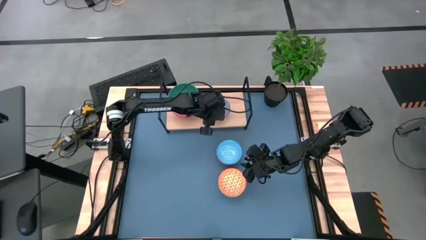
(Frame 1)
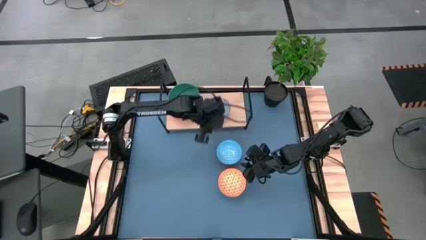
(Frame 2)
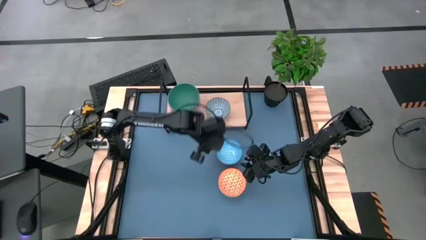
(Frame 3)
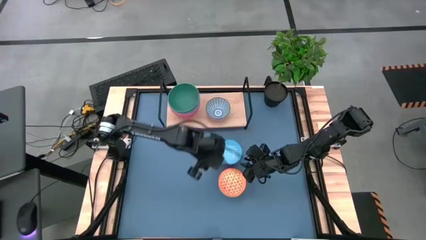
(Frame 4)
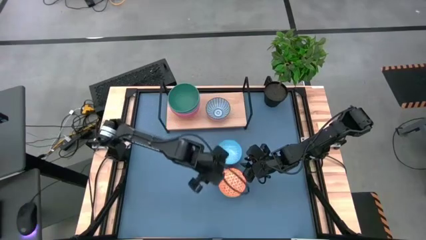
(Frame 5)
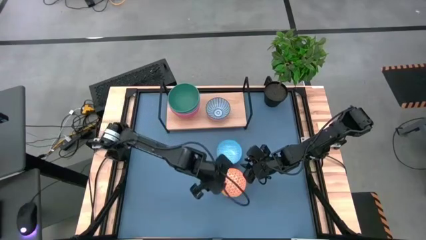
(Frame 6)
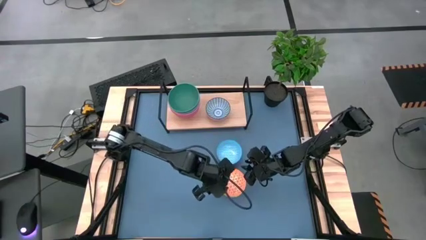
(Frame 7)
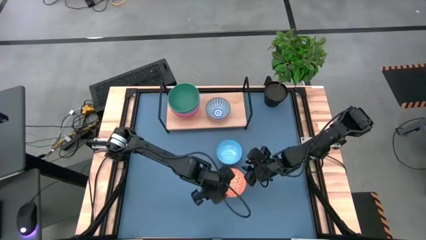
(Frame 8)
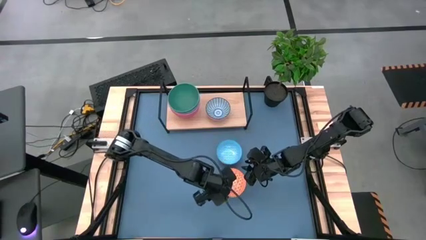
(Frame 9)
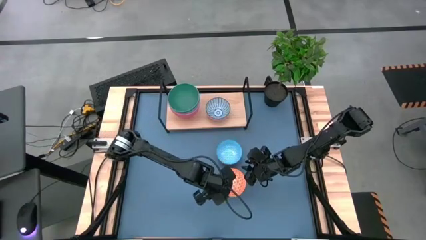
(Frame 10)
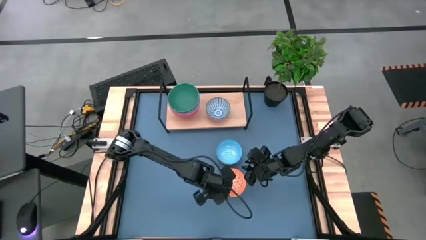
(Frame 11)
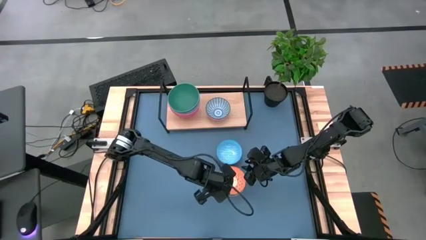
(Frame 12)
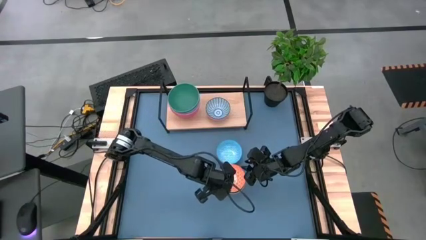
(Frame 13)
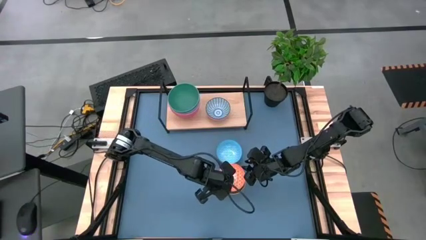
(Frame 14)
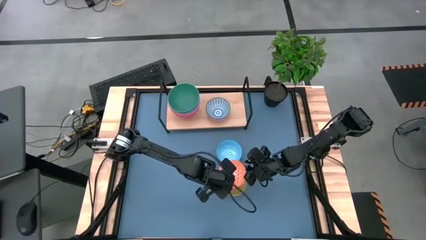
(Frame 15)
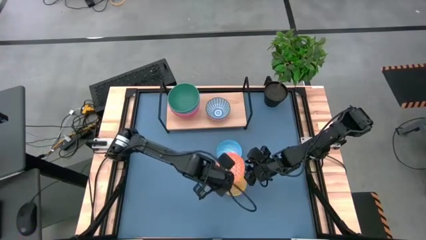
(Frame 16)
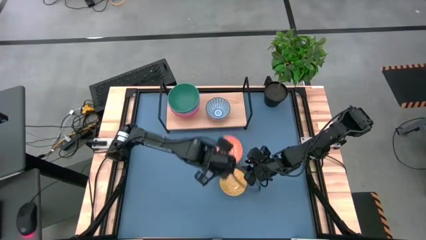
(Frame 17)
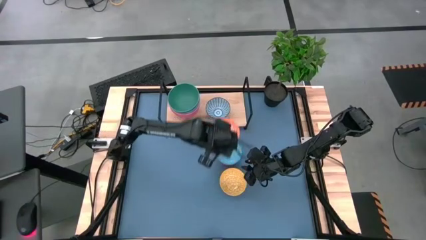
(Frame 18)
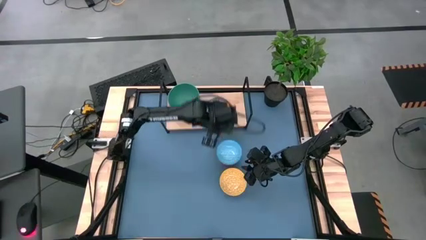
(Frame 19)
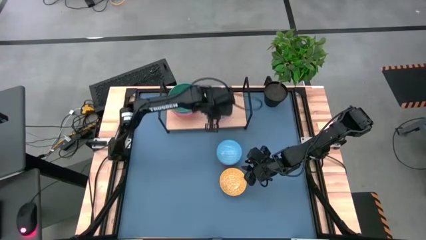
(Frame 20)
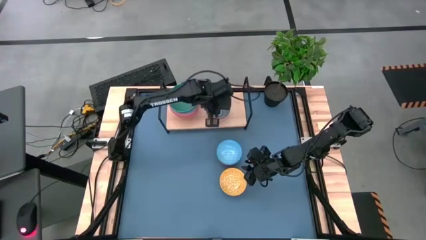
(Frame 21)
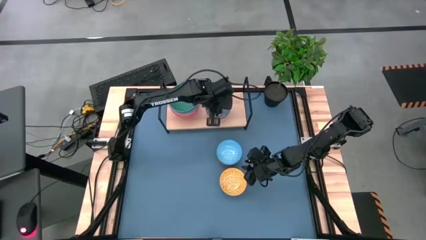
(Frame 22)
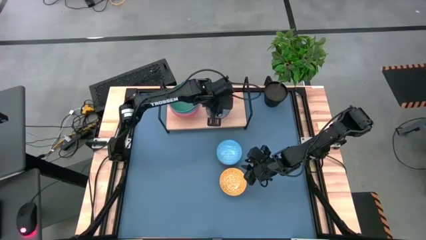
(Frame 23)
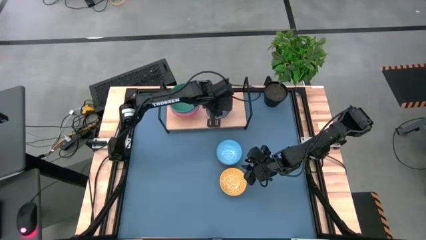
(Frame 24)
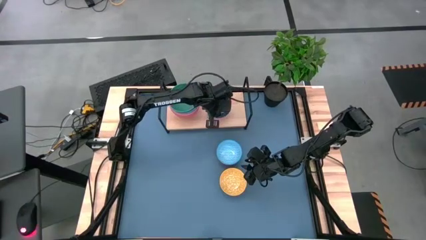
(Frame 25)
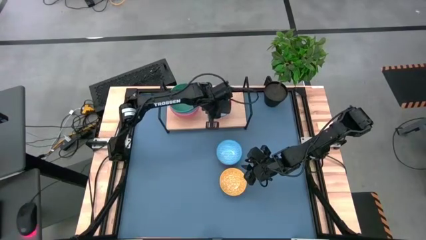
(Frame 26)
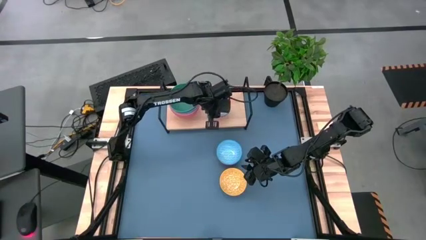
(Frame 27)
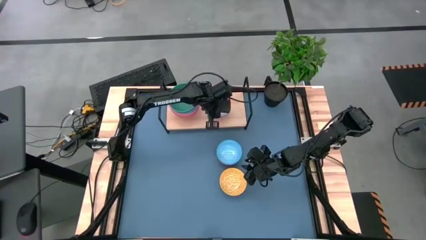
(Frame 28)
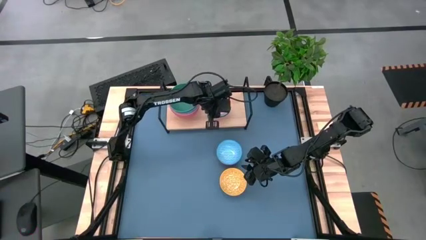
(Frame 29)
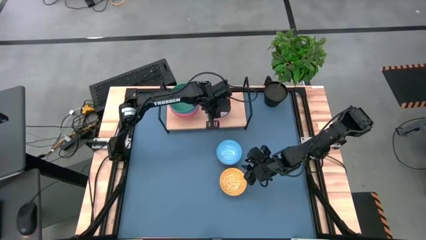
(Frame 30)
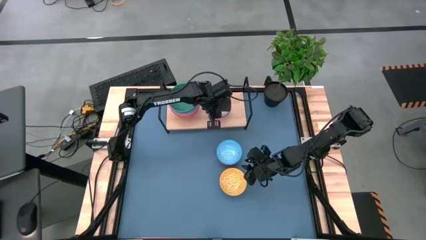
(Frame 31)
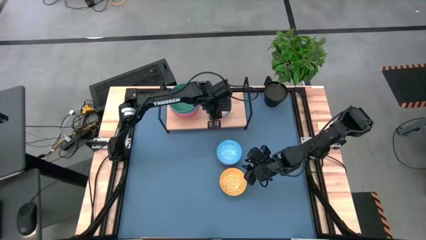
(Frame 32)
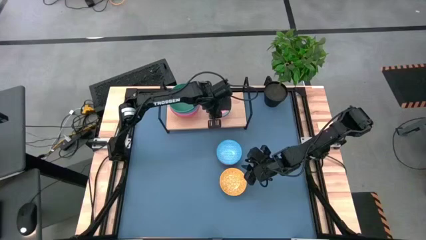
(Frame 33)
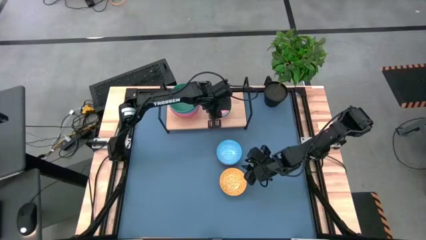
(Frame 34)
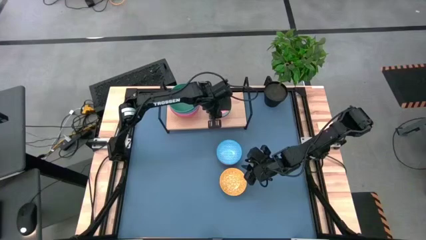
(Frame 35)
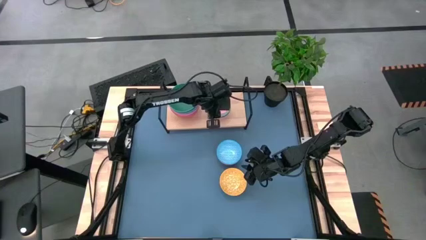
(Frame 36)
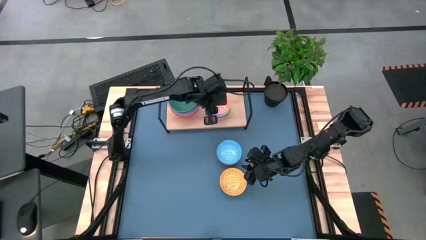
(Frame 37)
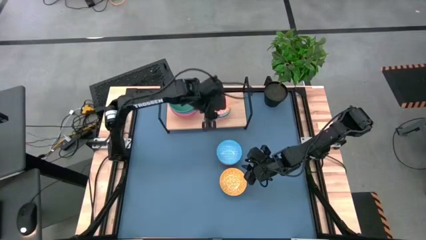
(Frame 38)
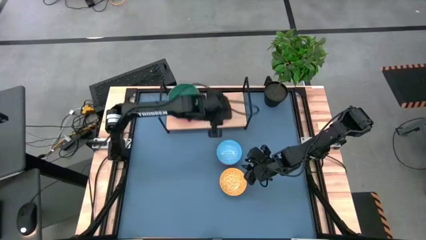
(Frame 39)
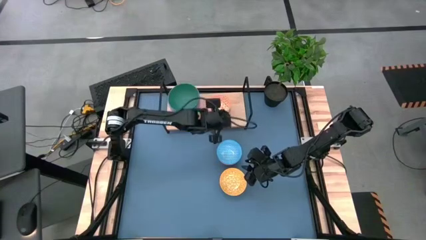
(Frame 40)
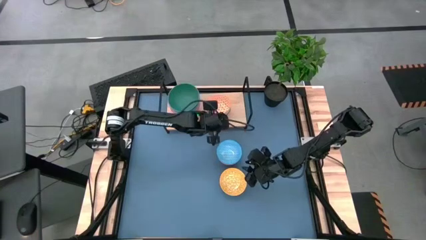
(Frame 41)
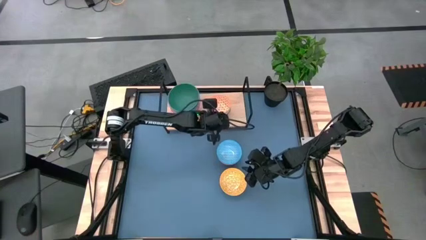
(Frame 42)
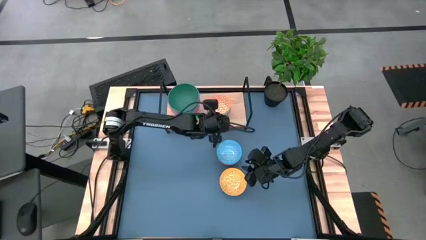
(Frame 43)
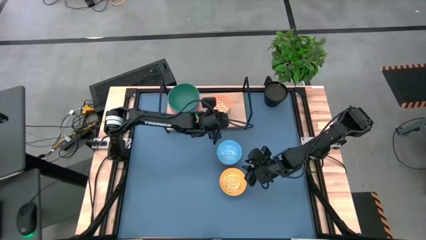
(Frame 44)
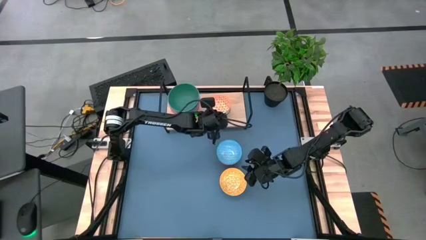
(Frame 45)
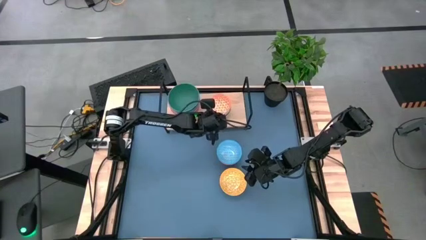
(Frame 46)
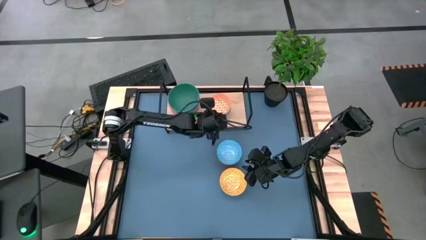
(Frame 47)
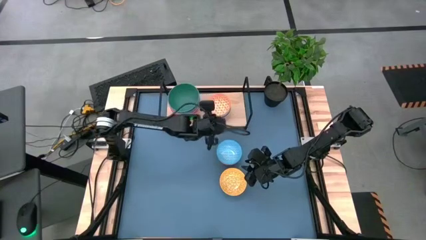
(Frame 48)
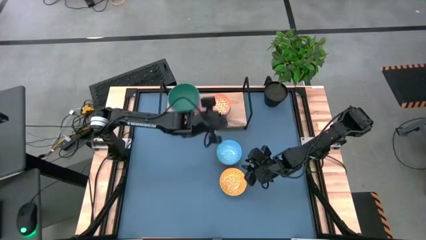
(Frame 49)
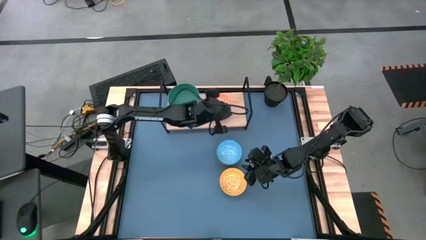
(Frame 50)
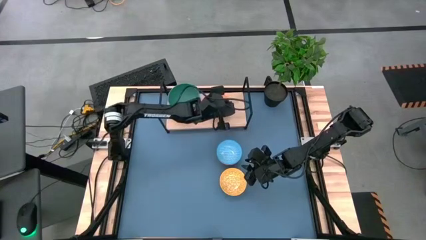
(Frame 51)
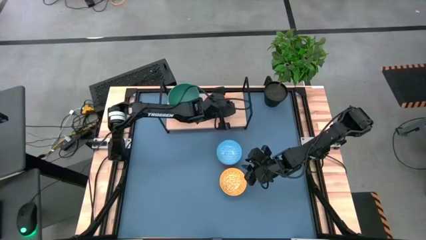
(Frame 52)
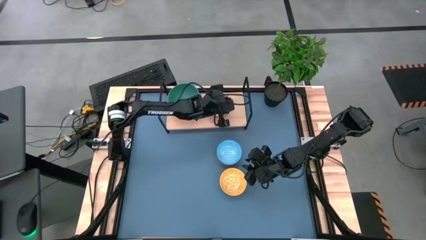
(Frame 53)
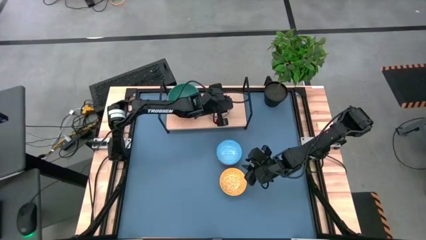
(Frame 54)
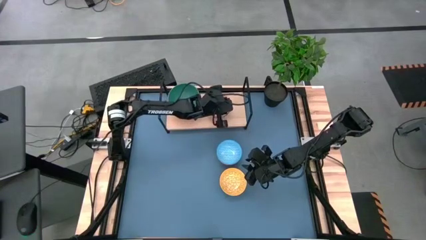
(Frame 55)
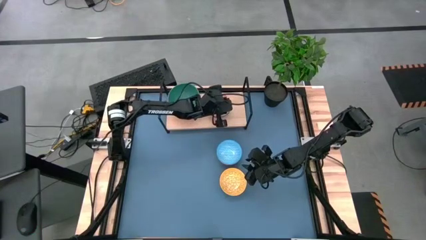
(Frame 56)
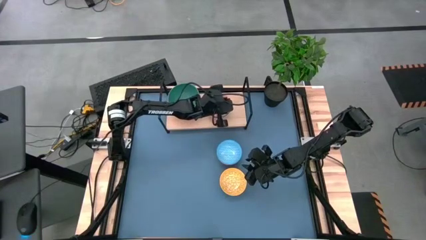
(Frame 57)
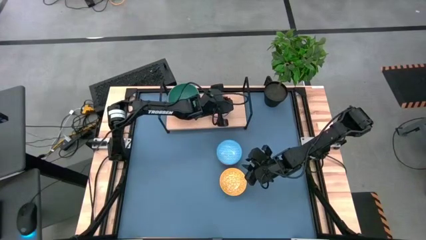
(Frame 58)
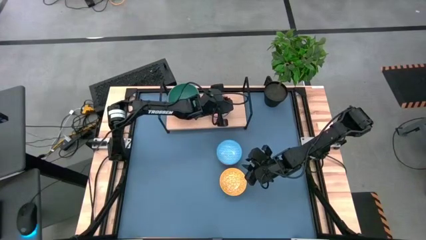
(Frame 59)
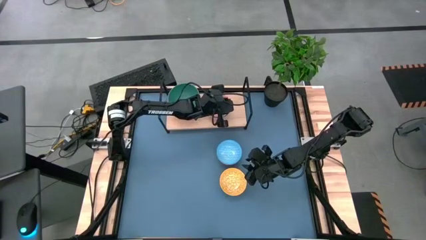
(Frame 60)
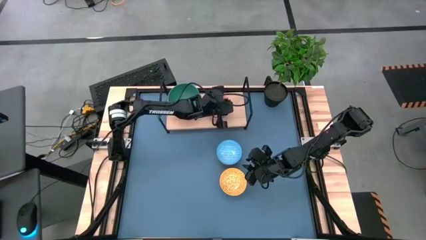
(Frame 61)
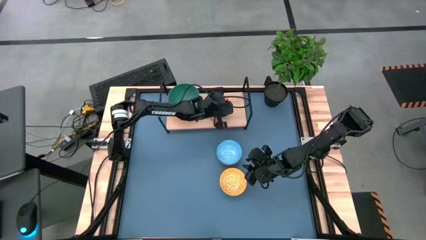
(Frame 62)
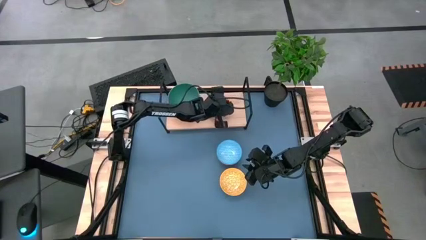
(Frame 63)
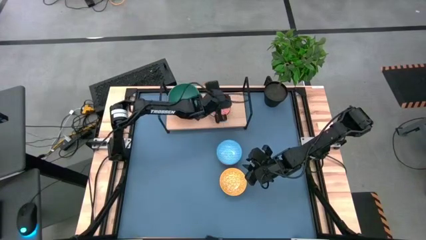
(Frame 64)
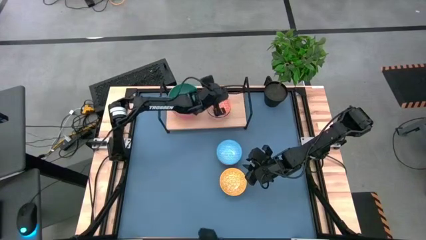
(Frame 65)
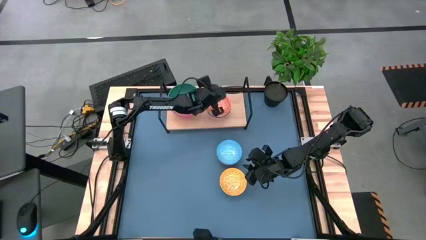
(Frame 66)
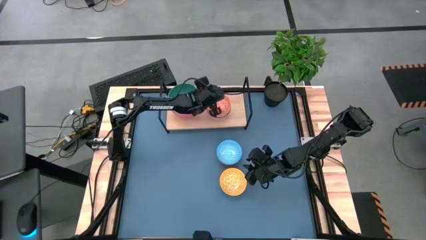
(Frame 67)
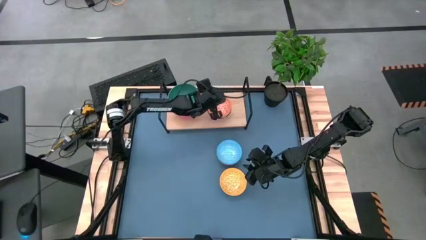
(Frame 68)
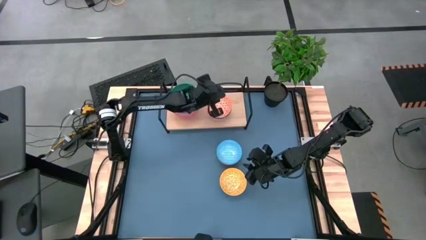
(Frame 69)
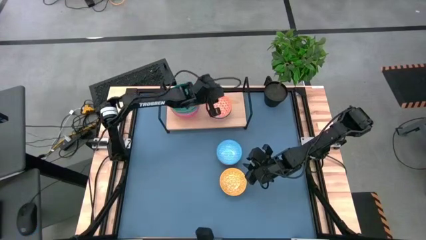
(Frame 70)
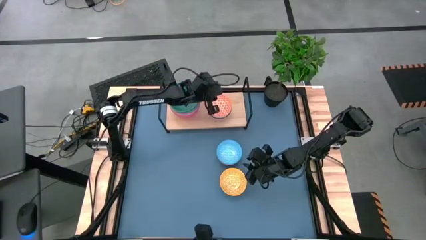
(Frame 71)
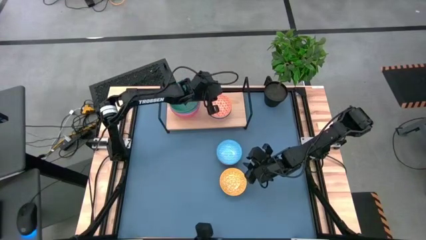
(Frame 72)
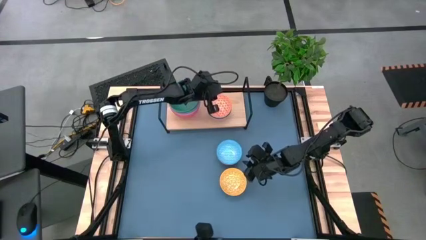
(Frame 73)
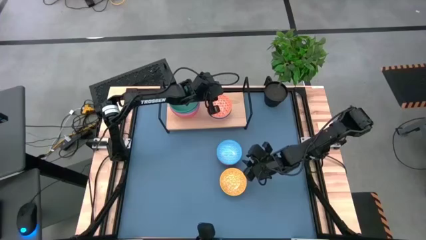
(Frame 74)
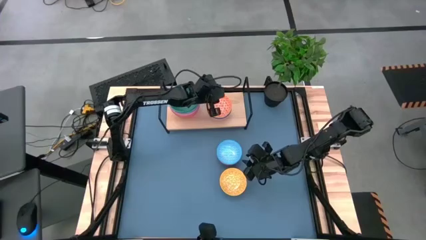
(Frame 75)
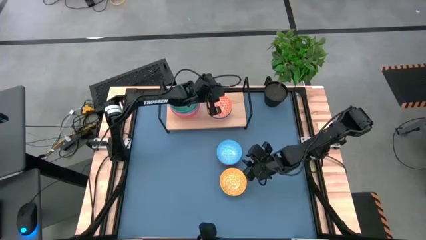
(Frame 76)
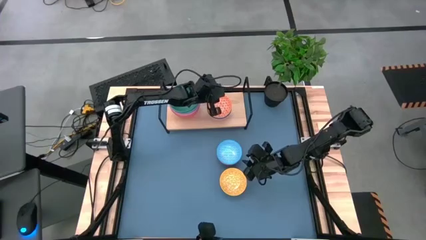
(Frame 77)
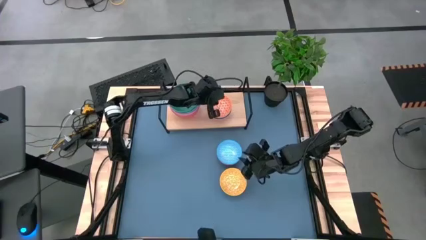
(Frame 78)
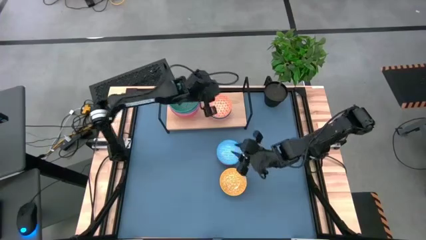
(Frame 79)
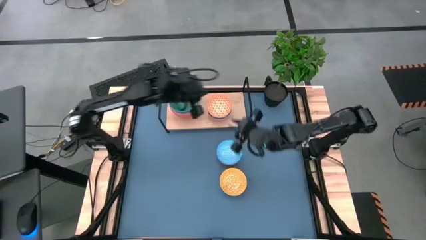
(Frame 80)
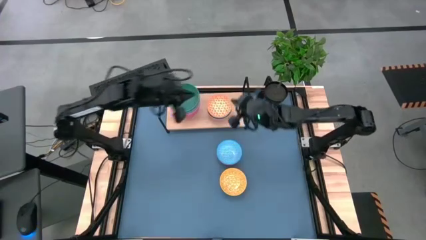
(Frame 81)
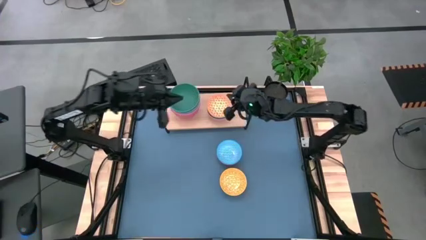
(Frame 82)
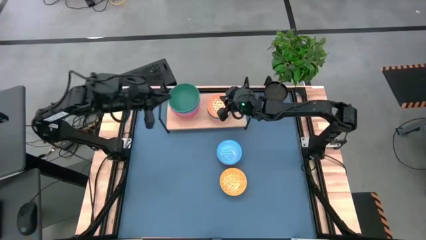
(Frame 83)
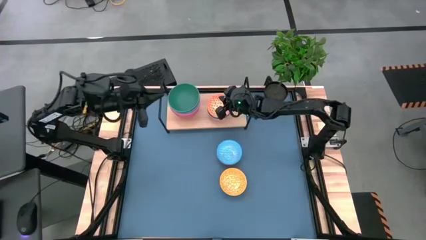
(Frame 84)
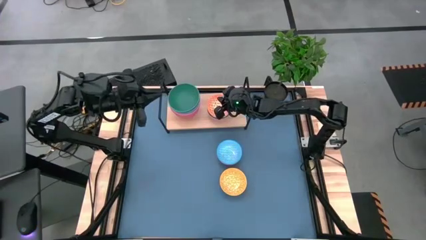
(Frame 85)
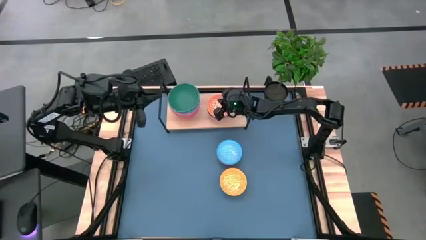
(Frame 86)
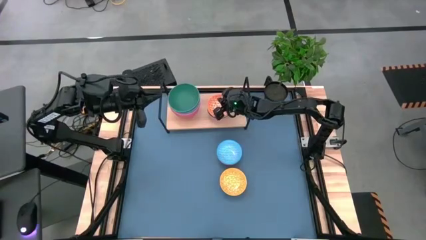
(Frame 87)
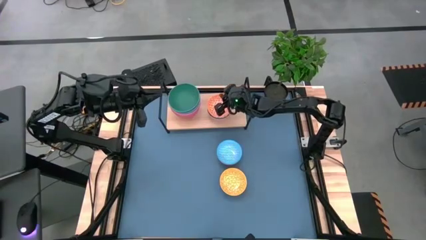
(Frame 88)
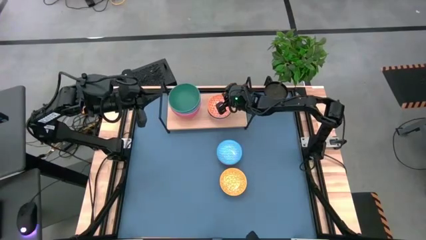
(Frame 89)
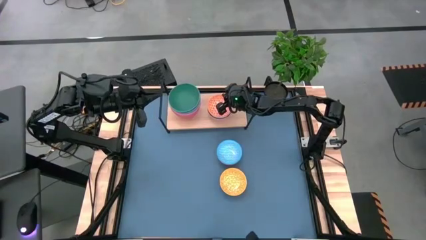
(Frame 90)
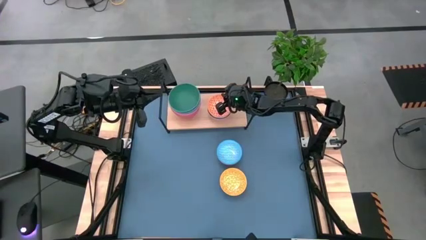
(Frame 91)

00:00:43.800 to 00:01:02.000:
Task: Place and stack bowls onto a shelf
Stack the orange patterned bowl on top of the dark blue patterned bowl on the shelf
